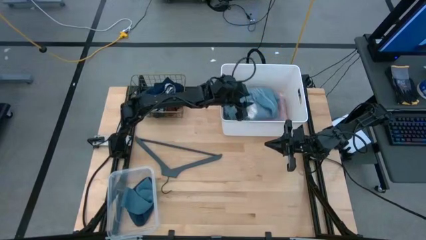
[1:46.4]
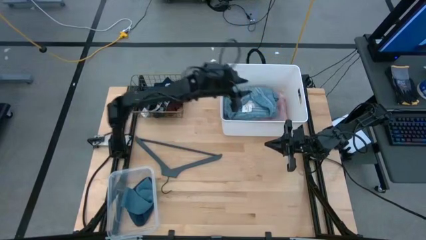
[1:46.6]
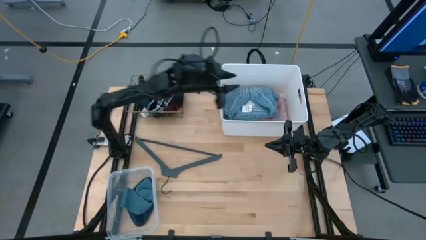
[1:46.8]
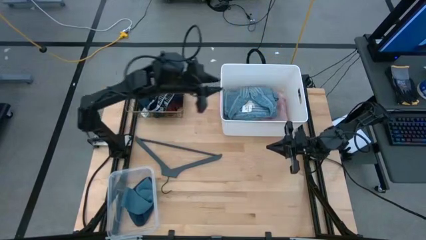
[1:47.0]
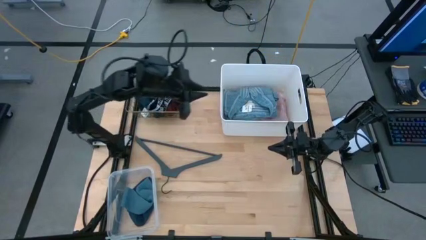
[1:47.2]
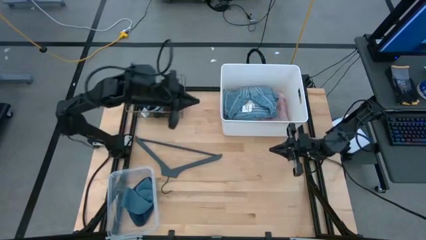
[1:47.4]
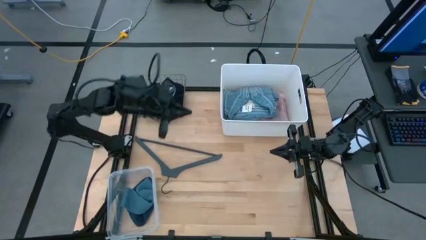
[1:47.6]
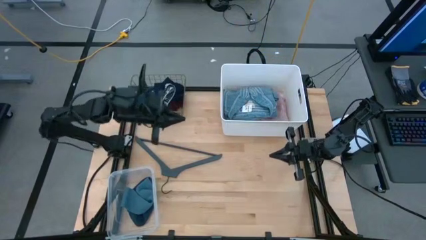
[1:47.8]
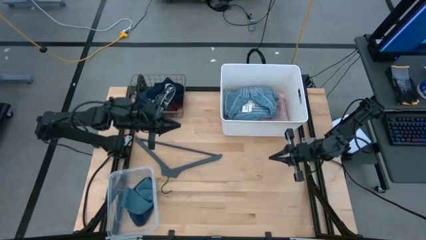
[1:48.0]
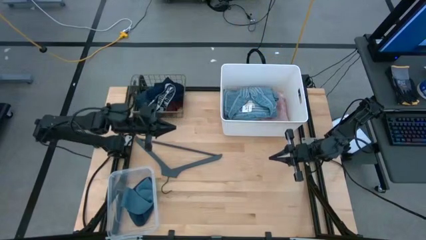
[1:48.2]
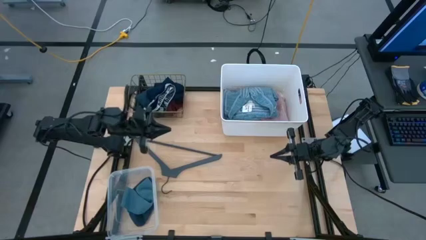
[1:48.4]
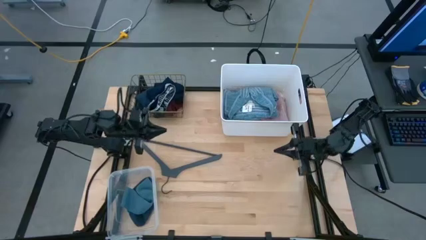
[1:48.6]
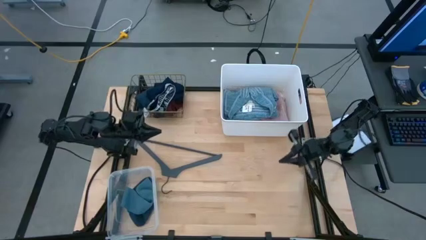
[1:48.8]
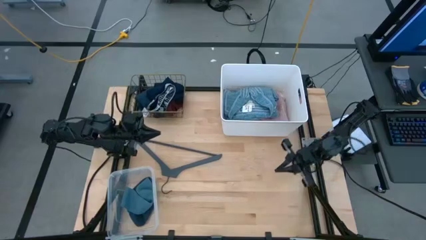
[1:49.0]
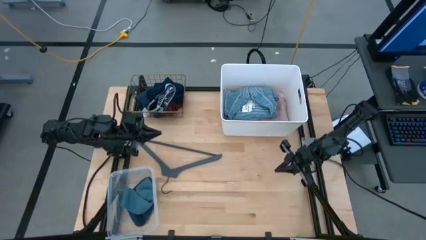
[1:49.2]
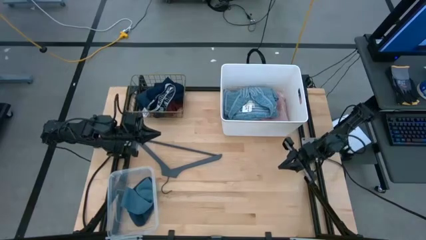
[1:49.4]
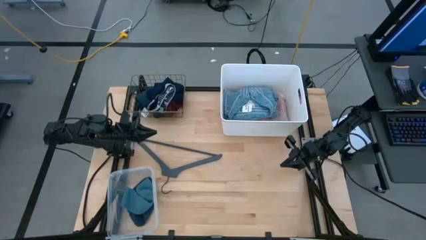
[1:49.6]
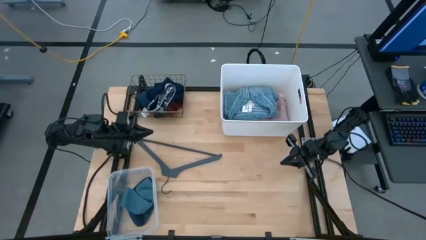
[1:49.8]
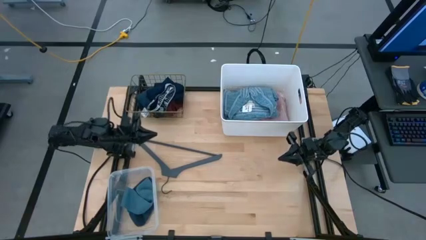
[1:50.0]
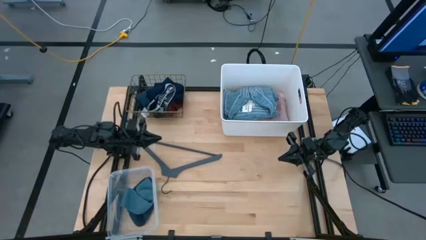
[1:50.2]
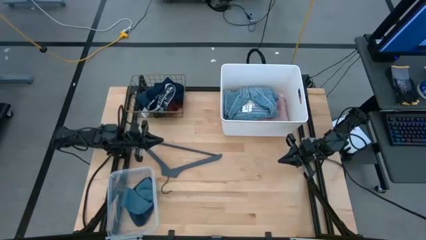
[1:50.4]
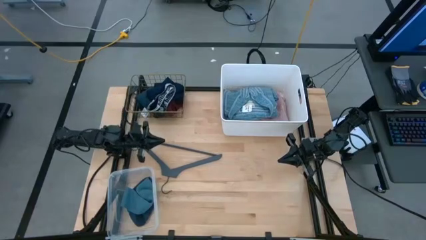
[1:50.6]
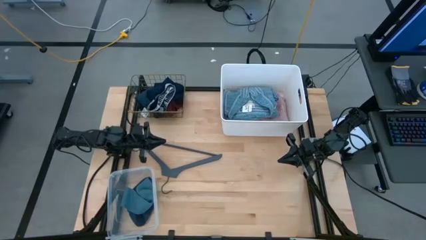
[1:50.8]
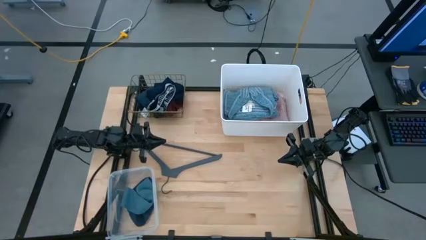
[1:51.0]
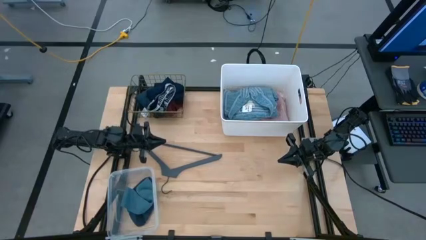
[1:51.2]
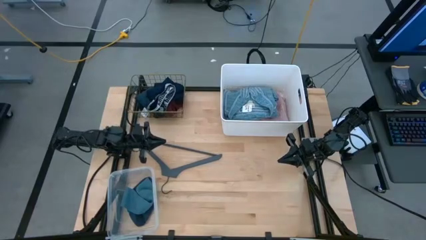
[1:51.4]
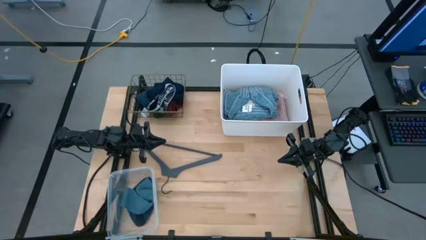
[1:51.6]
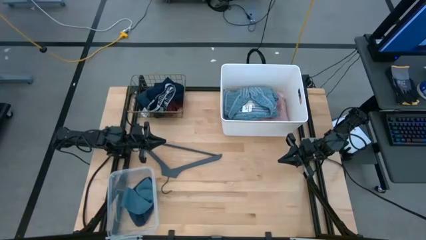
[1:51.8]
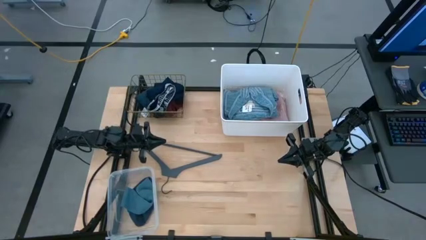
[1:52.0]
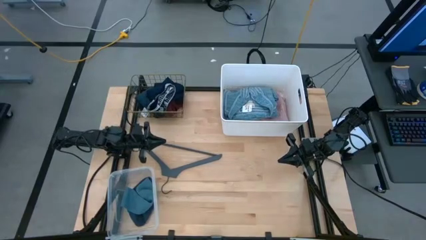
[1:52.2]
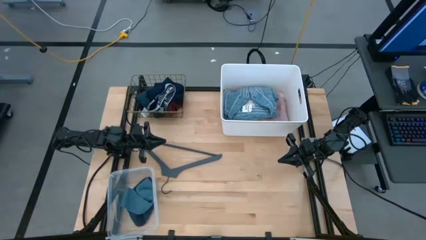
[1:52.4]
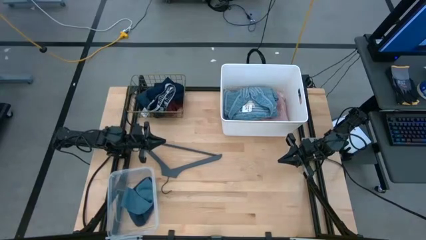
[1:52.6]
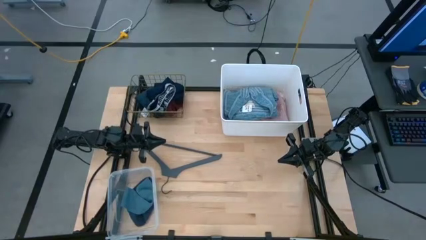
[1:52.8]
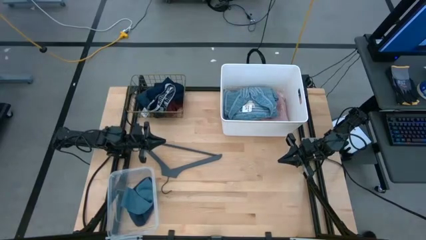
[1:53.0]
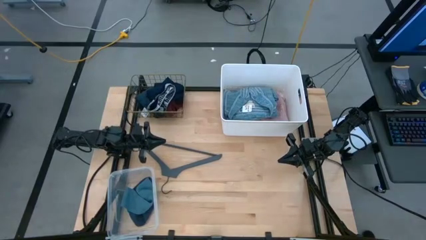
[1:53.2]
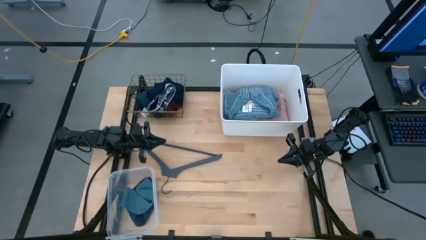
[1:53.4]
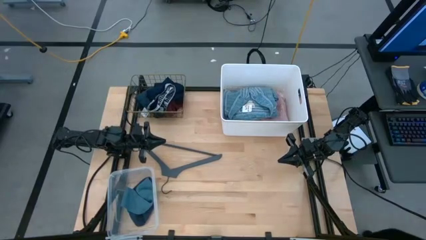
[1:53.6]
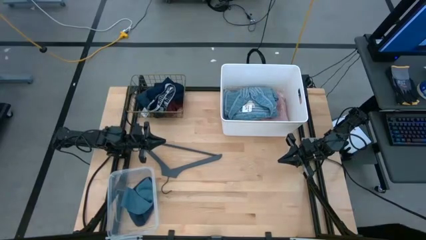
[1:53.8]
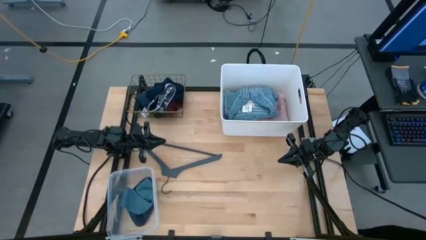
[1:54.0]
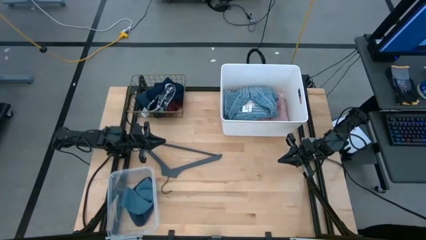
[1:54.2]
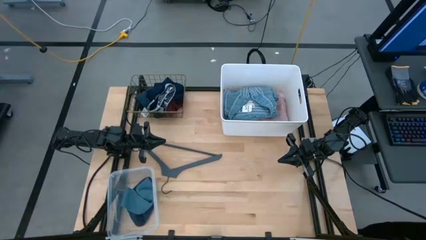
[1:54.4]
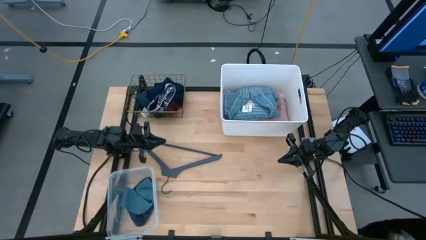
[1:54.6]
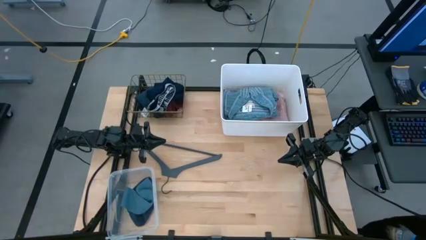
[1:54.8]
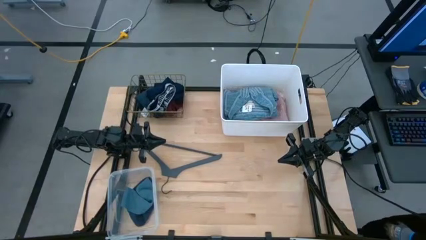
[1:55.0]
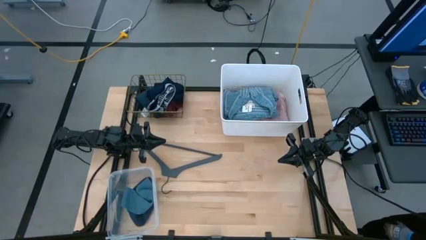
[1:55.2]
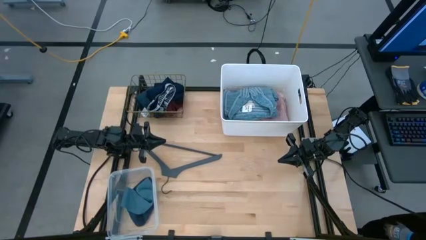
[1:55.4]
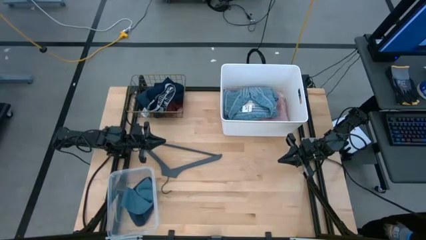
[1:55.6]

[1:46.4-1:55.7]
Task: Pick & Place Cloths
Return to Home Position

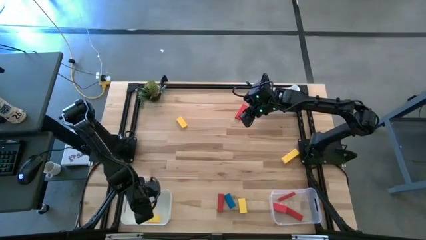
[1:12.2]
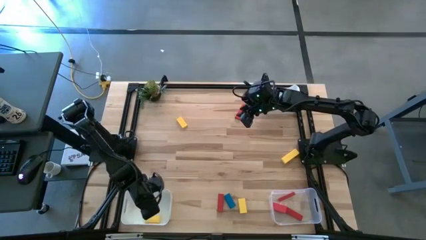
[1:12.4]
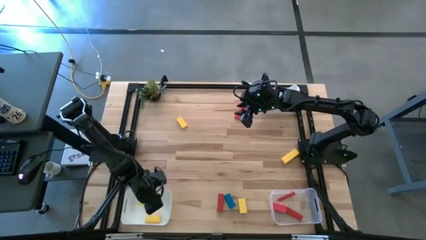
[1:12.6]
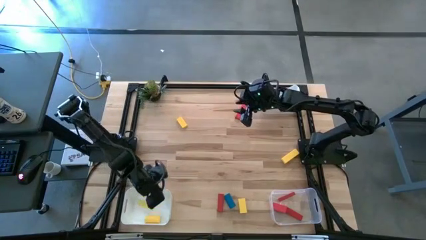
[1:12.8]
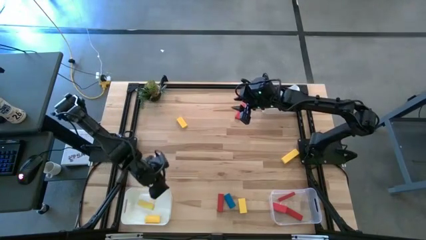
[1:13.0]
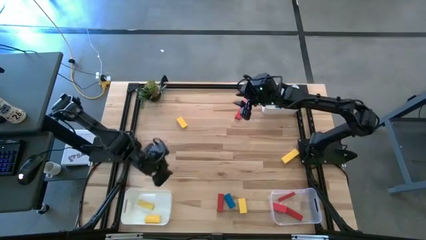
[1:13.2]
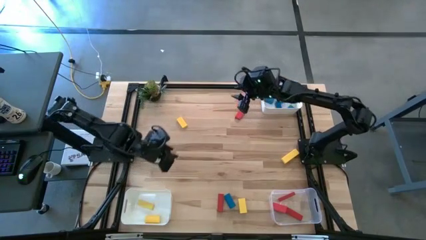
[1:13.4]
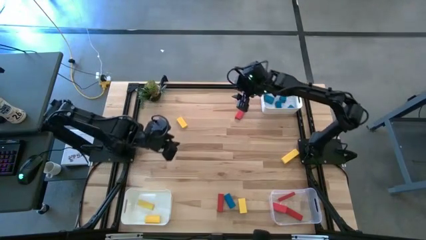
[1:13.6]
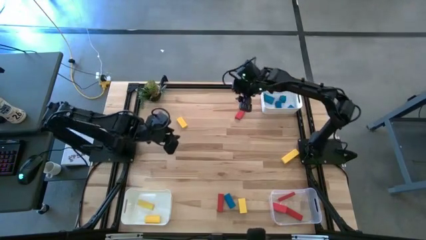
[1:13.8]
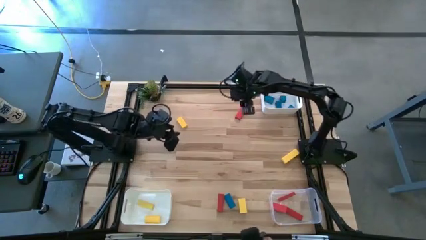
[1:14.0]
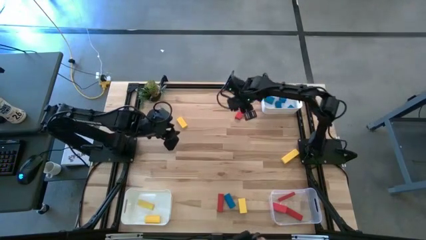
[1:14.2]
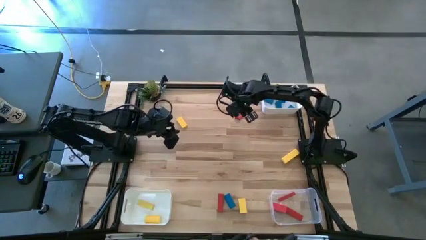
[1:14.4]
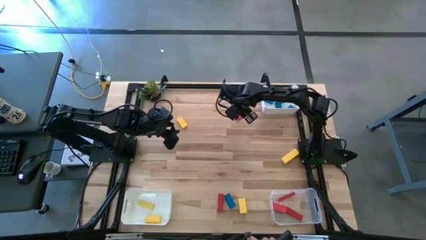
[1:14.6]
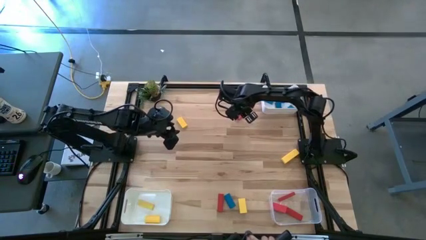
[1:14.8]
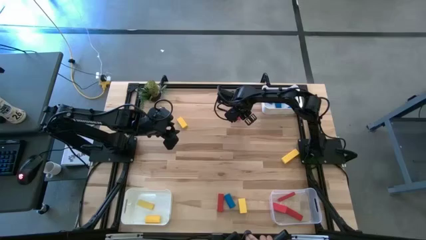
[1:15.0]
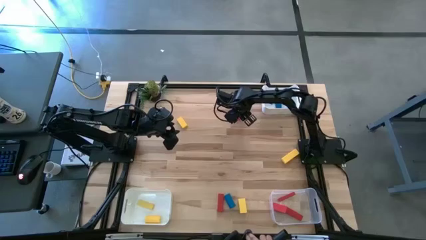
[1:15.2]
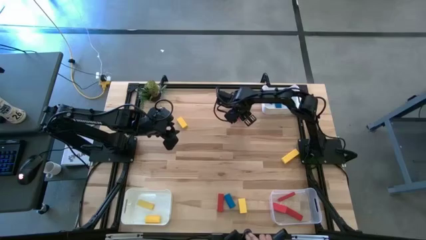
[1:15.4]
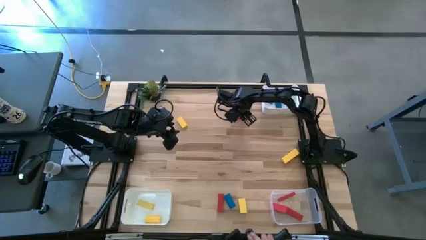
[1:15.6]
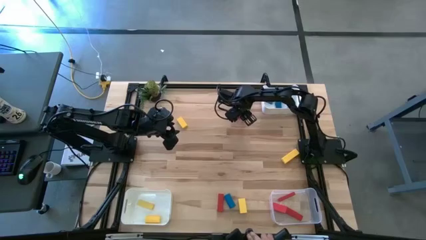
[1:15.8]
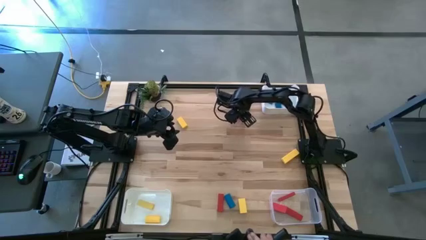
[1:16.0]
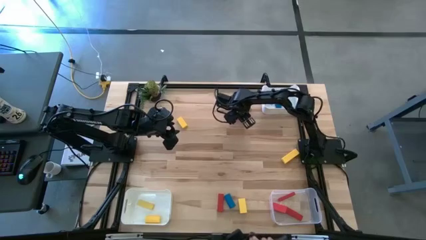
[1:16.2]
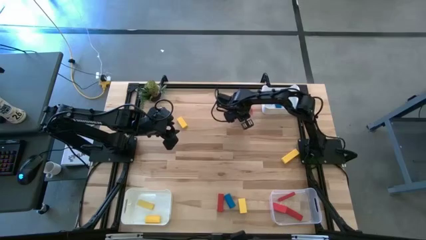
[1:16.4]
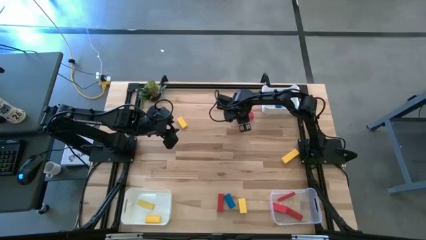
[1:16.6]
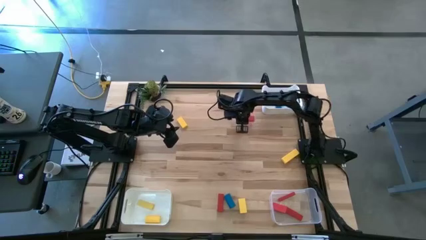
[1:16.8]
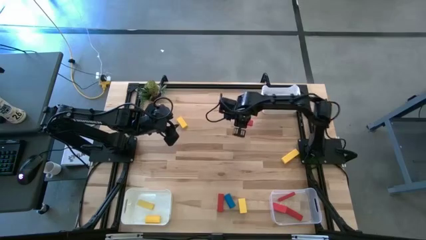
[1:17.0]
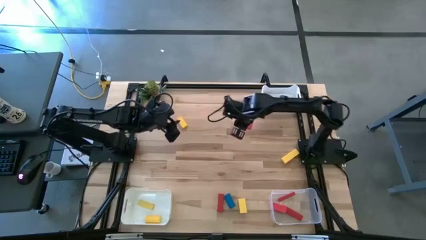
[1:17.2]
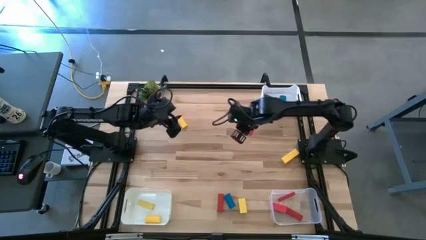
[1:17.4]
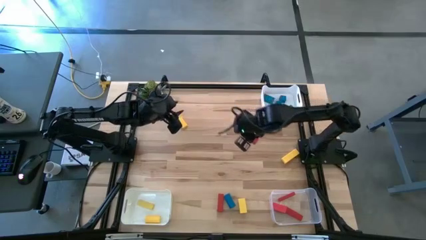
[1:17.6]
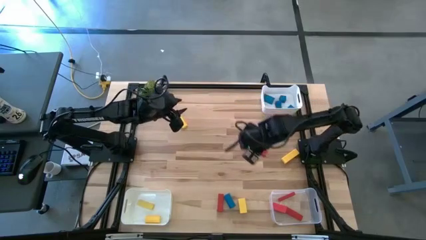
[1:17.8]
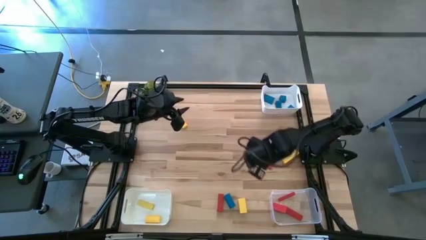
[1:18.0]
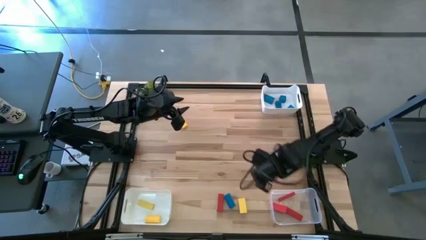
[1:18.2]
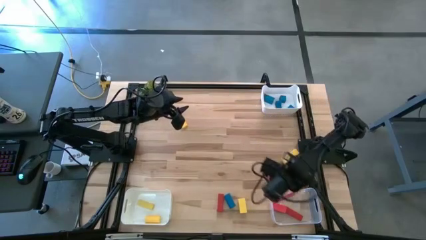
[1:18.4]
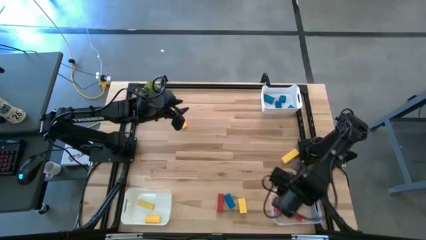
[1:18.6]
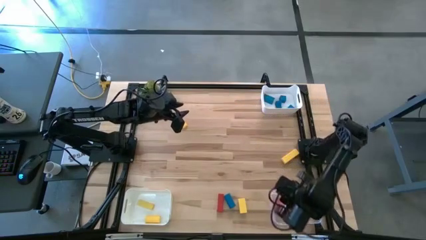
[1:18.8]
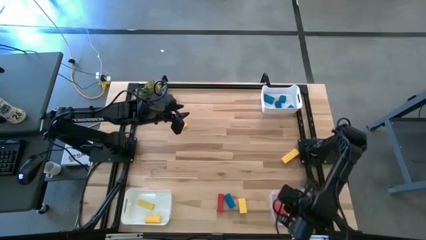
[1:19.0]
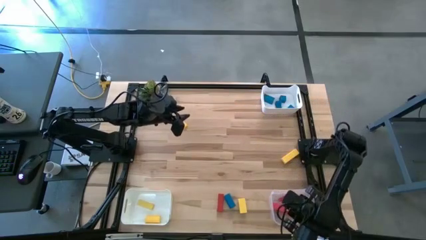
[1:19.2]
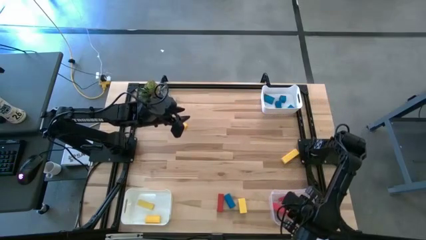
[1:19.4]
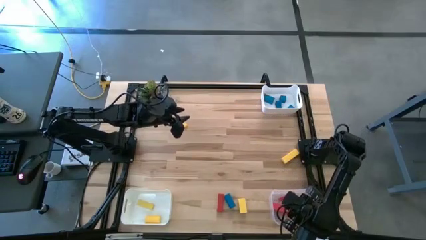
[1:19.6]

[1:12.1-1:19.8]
Task: Sort & place blocks by color
Put the red block into the transparent bin
